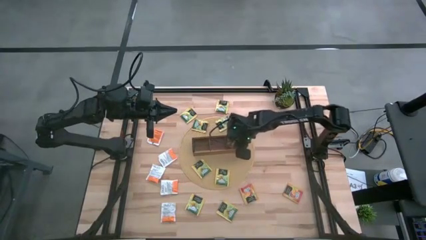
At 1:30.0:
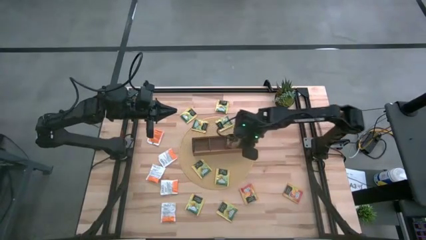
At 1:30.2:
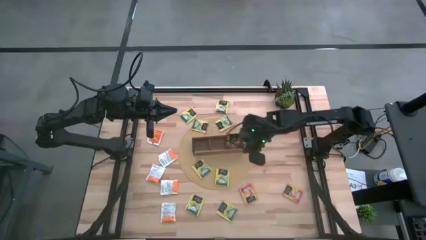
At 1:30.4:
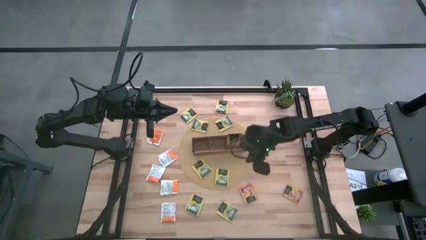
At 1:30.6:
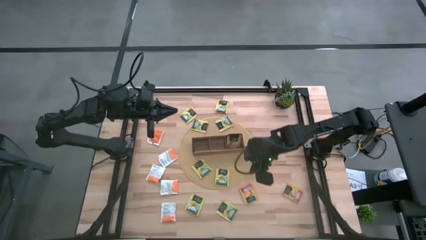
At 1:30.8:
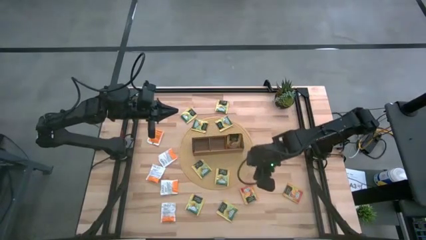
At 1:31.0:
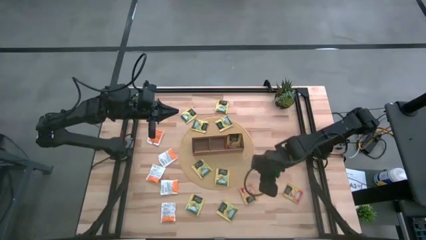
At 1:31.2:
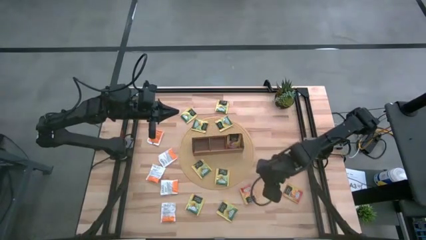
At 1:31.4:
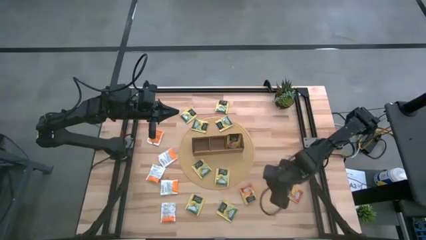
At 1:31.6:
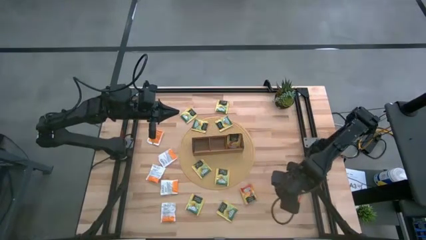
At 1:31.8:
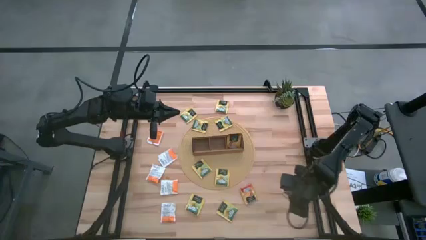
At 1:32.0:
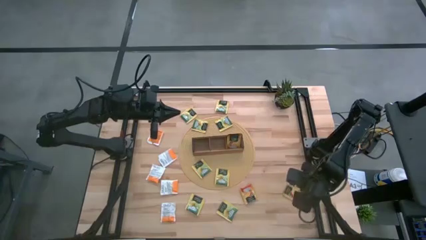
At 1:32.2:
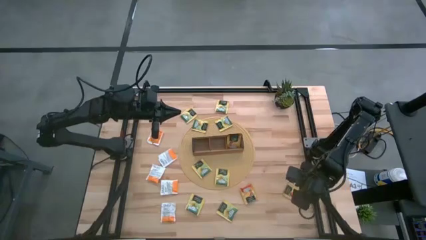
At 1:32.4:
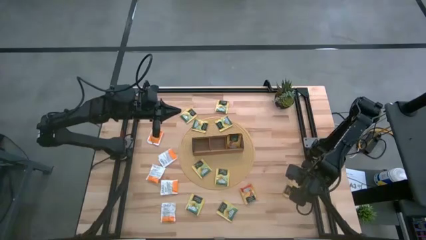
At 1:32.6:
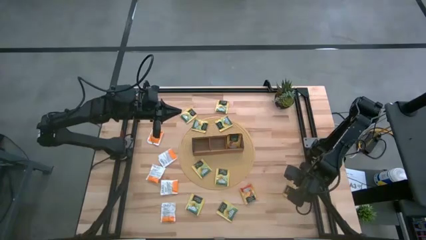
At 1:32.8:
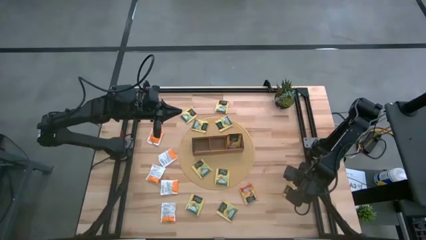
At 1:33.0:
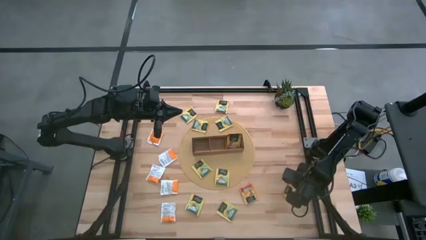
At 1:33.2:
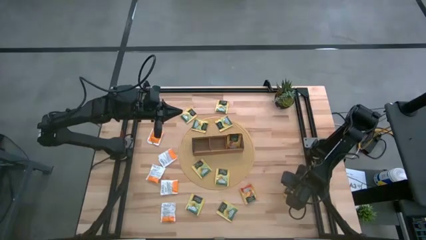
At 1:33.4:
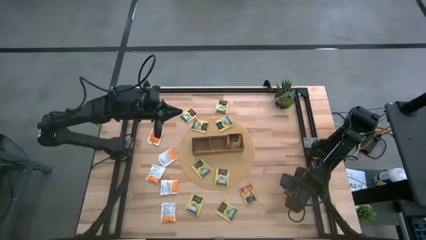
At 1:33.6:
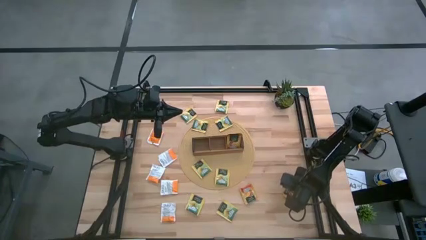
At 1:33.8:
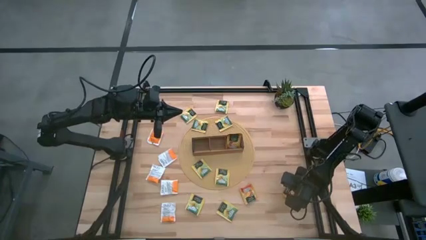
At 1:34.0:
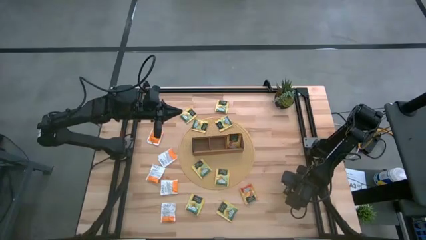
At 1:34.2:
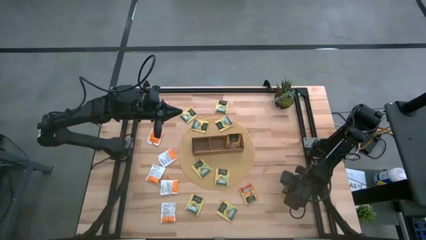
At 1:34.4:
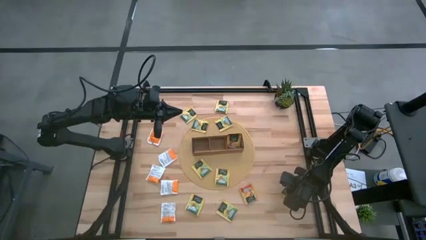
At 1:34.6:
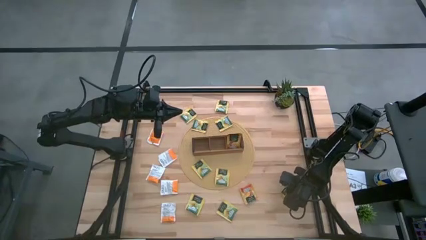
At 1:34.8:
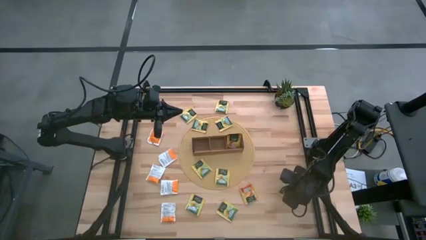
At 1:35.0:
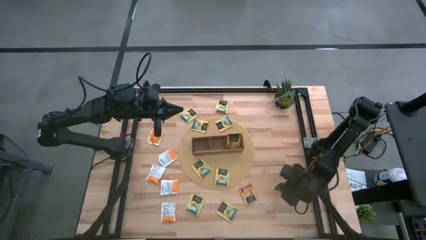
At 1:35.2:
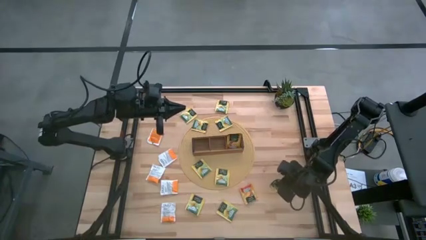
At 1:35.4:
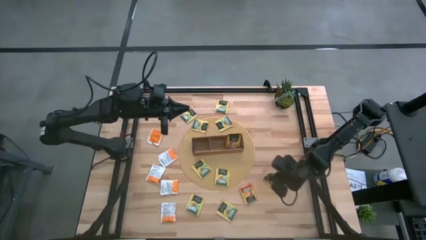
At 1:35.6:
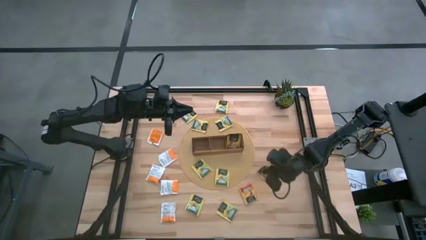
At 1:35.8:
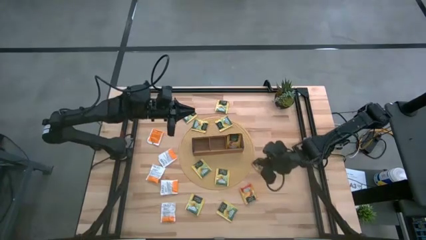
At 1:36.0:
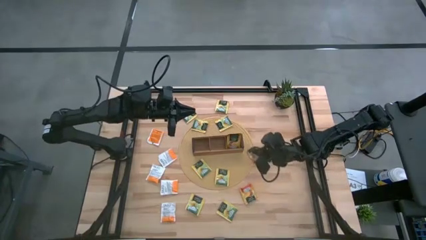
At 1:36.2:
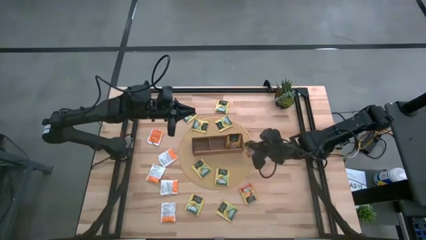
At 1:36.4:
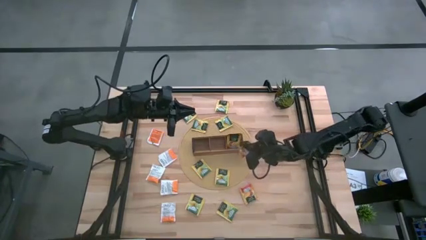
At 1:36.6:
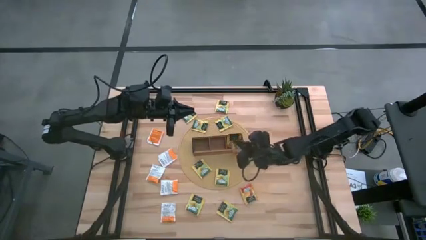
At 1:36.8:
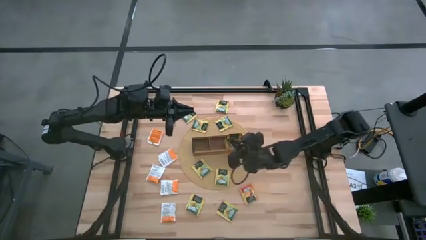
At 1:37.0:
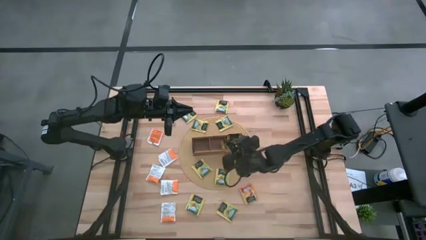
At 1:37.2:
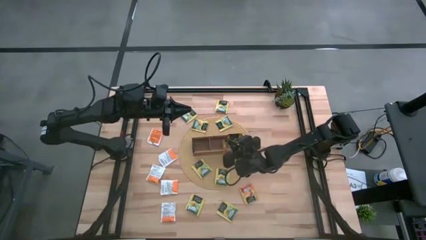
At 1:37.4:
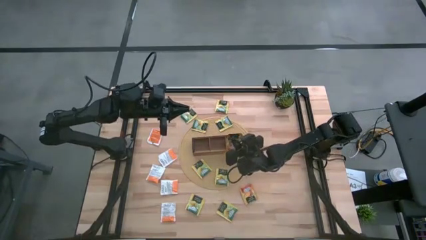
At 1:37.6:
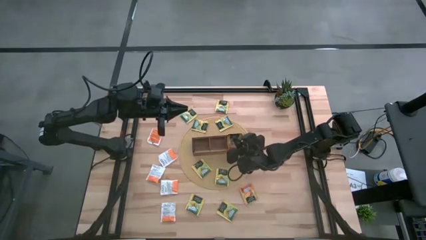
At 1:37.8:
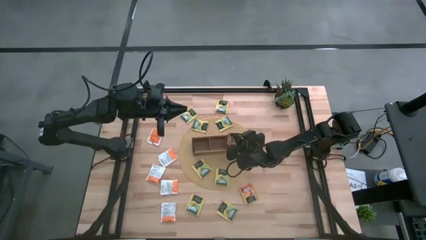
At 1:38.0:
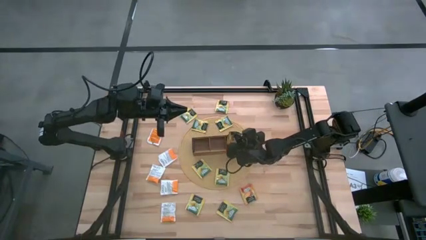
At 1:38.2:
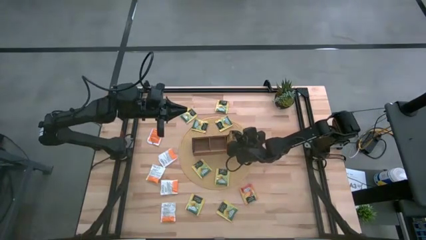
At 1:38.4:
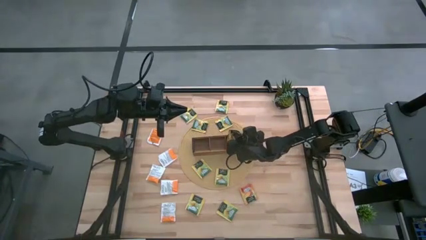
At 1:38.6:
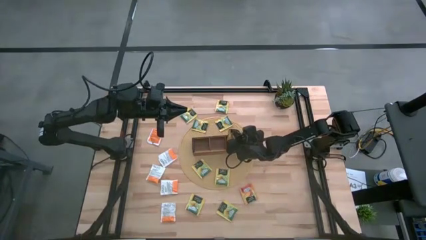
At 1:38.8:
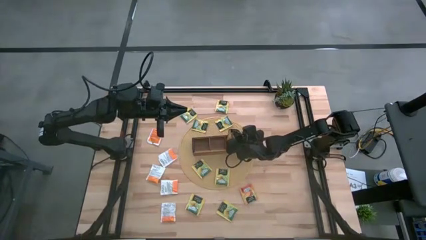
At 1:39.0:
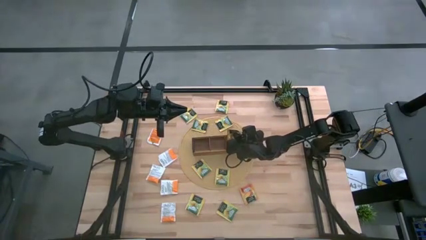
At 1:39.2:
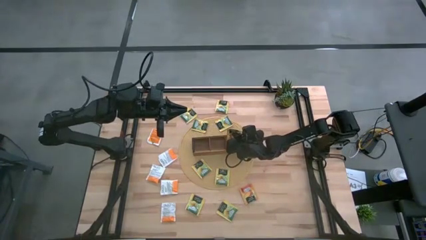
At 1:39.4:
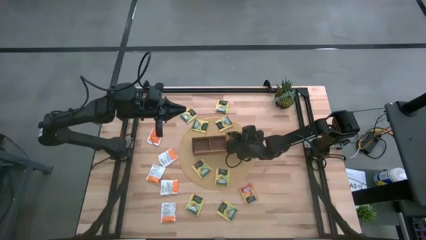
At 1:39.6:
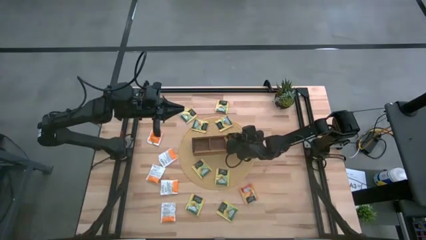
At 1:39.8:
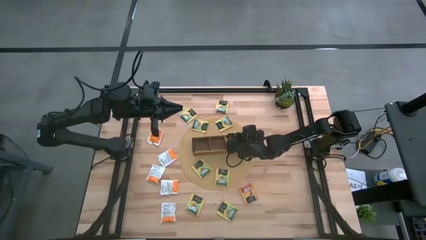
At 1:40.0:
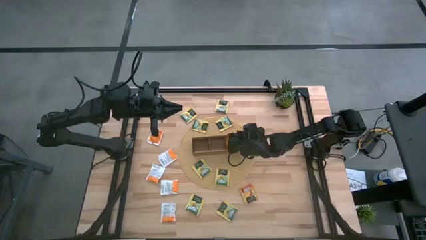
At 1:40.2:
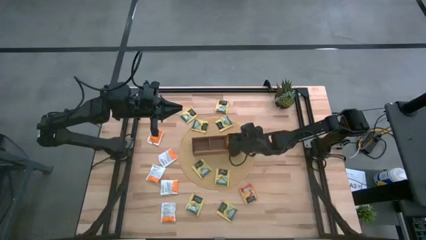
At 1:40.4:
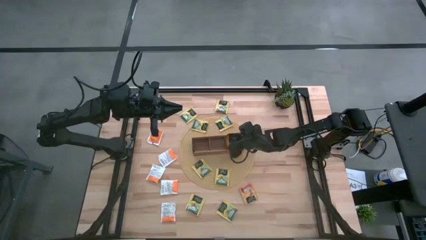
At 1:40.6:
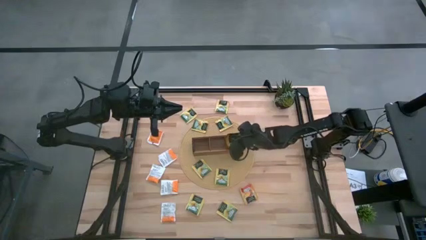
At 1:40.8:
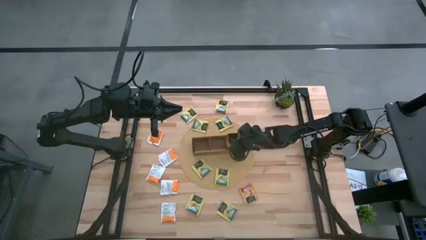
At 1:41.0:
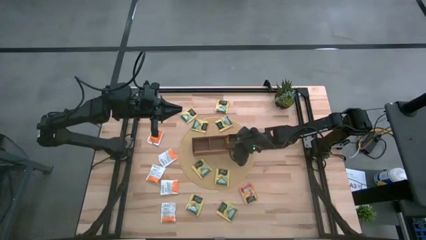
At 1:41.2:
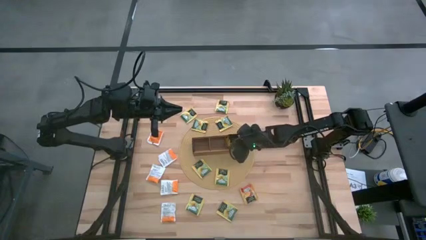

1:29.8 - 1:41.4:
Task: Pick & Place Tea
Put the orange tea bag into the right section of the wooden organizer

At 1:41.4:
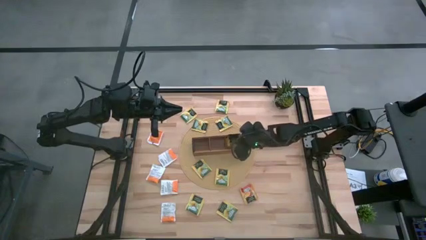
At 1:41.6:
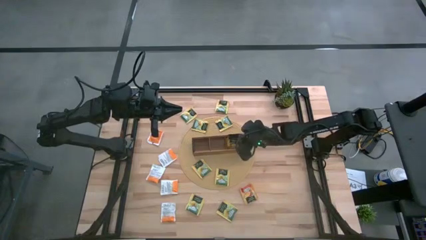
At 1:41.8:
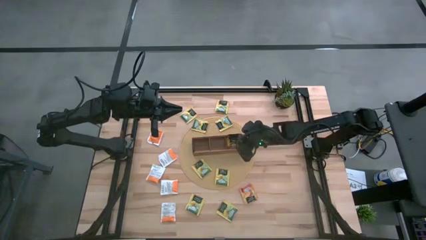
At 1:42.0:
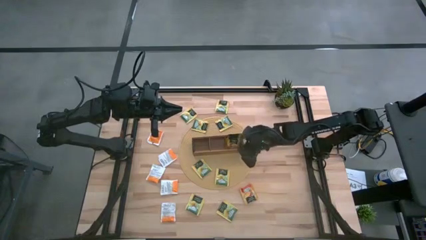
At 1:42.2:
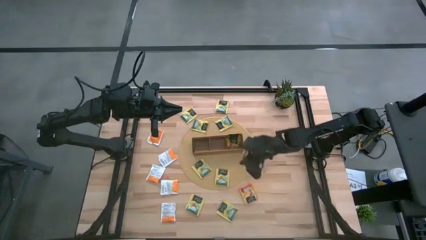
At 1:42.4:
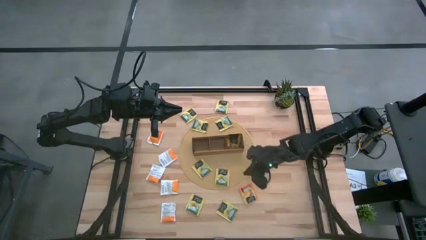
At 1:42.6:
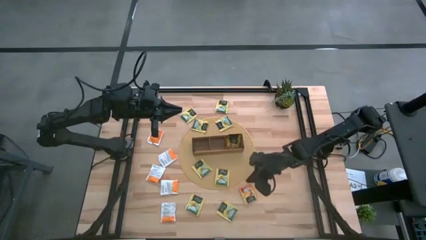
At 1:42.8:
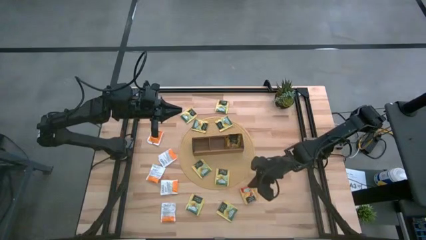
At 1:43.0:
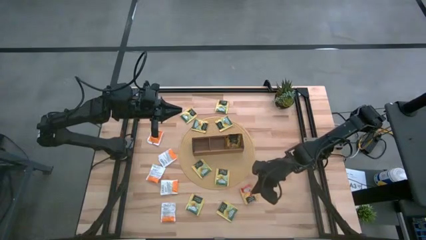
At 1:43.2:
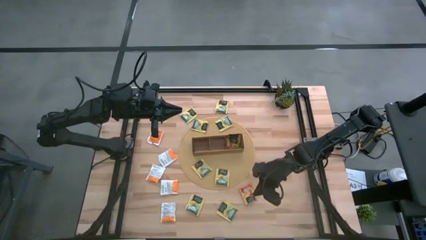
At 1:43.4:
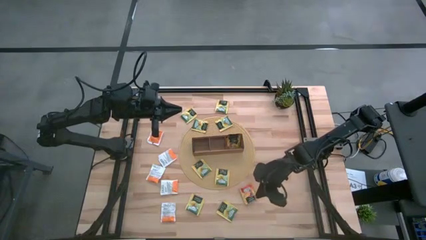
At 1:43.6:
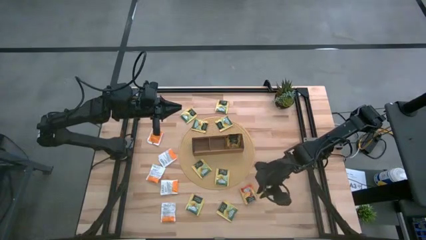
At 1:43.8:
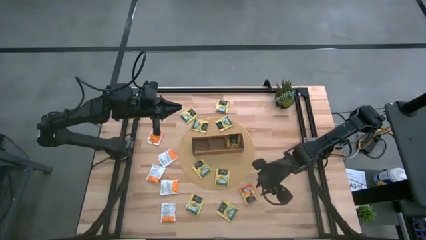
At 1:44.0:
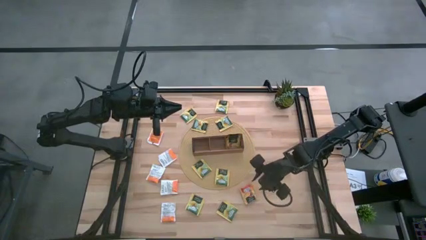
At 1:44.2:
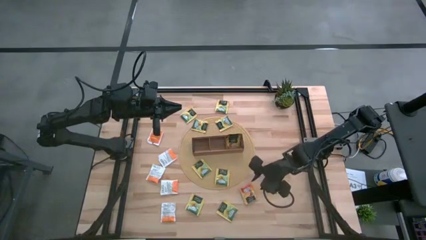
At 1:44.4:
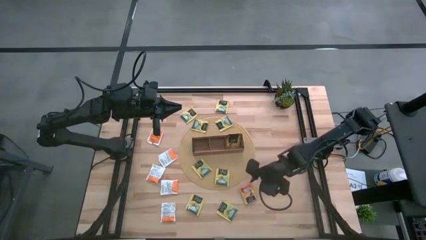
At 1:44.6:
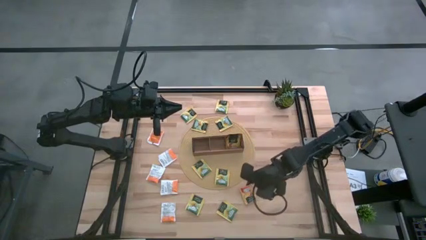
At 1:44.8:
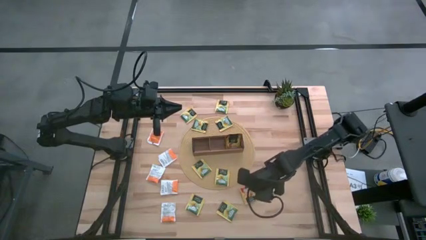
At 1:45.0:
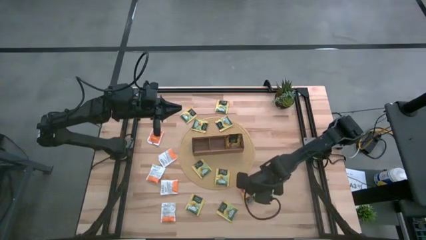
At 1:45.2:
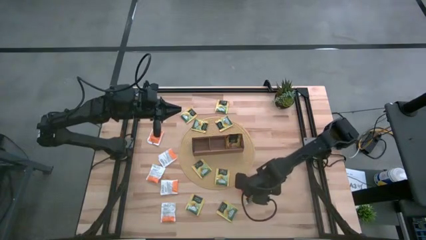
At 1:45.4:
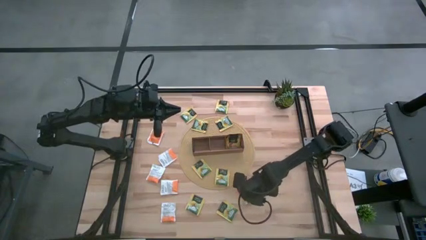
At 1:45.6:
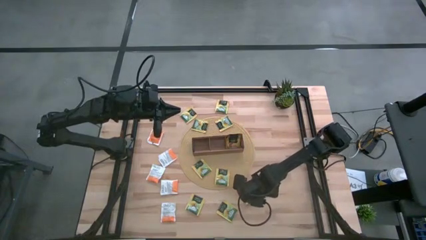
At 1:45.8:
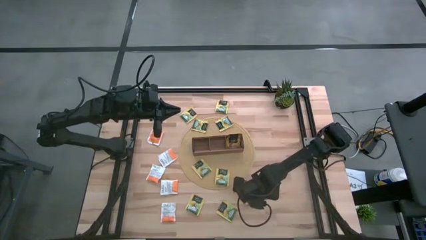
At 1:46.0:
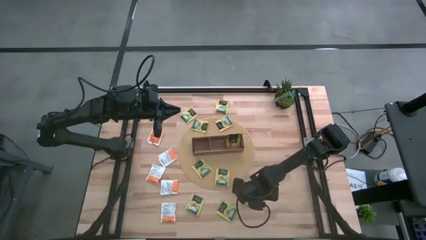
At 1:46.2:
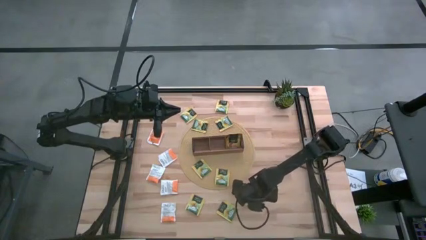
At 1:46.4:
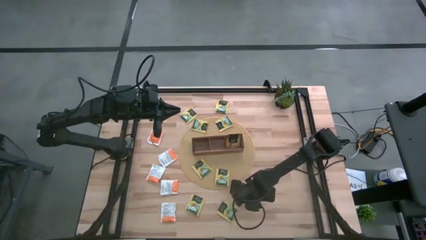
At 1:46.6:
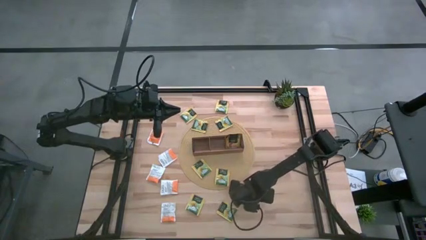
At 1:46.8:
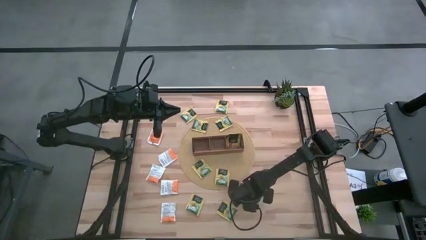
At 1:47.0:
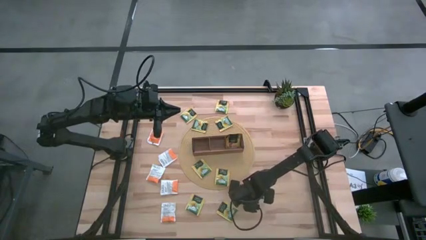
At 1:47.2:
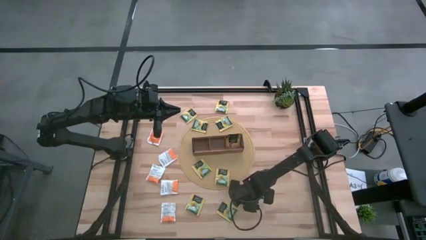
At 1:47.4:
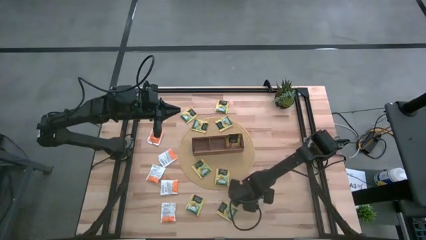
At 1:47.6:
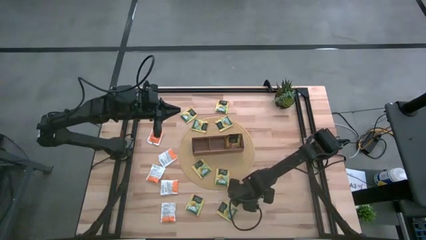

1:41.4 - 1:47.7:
Put the orange tea bag into the right section of the wooden organizer
